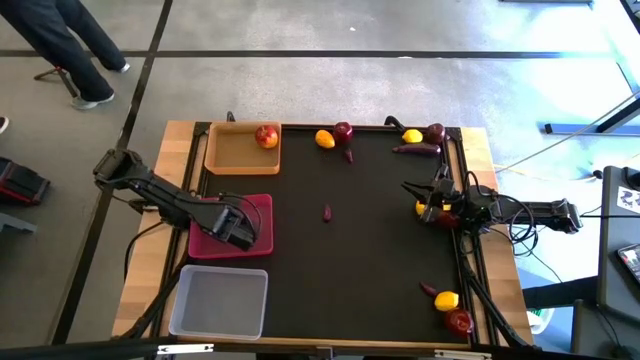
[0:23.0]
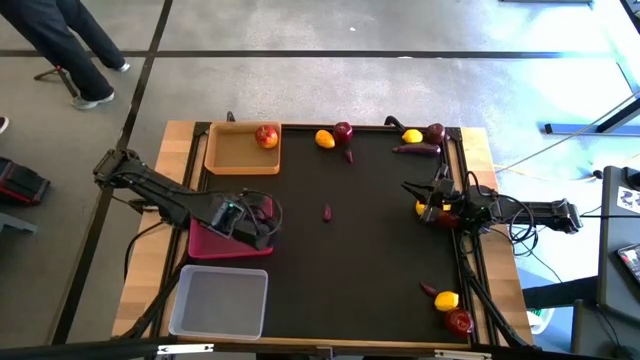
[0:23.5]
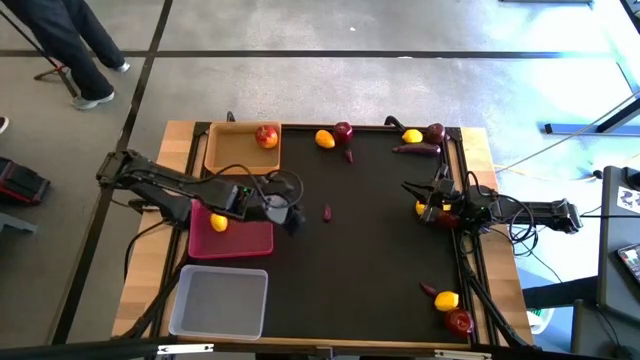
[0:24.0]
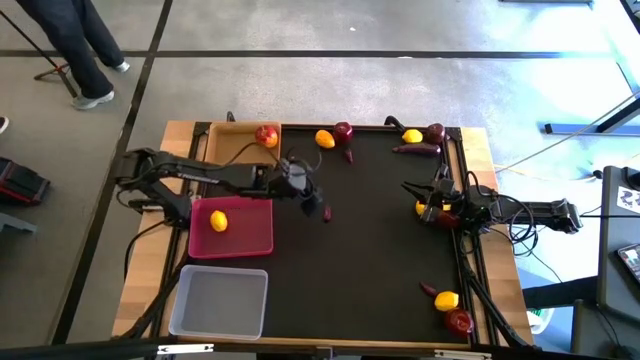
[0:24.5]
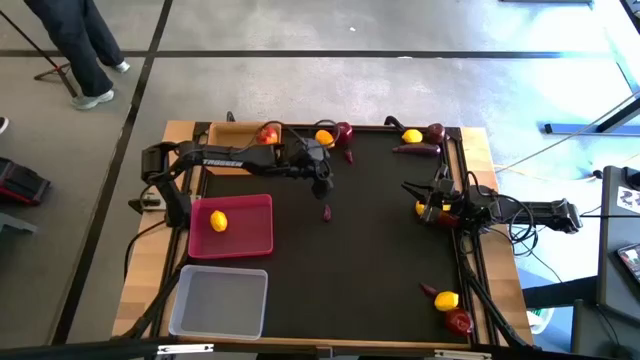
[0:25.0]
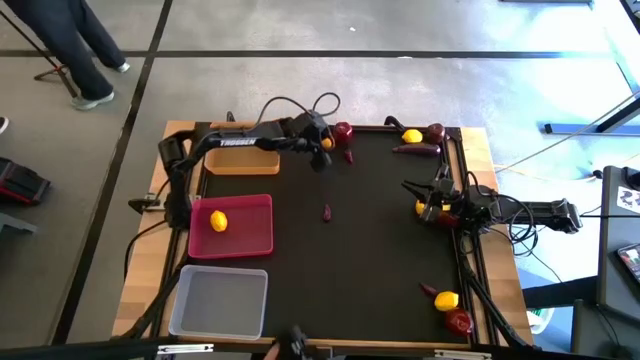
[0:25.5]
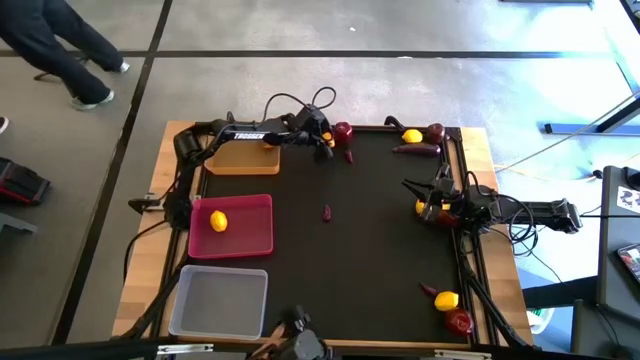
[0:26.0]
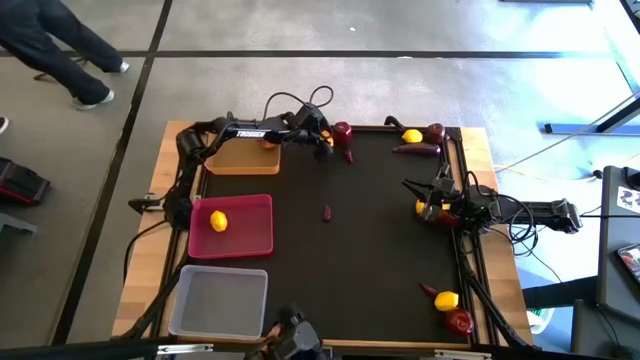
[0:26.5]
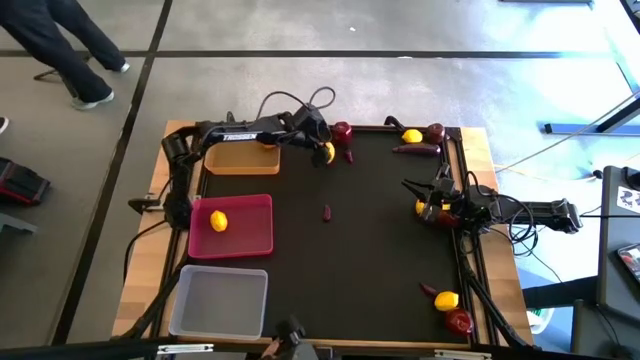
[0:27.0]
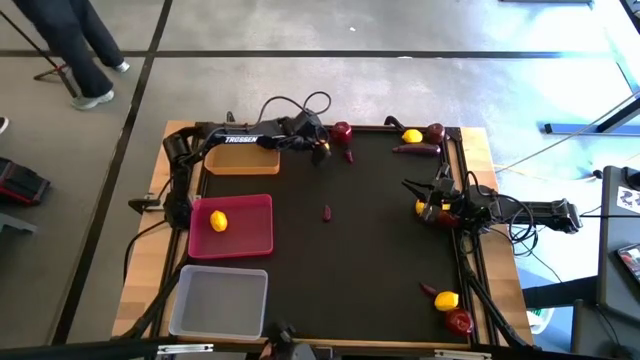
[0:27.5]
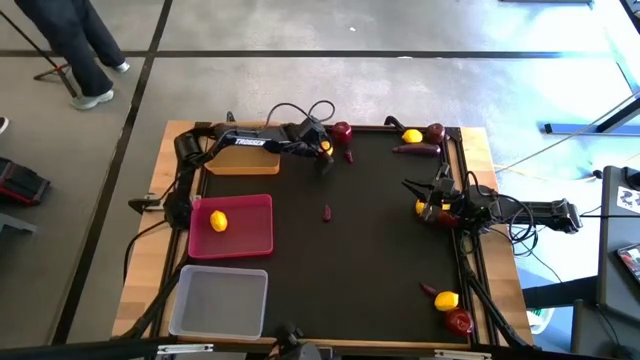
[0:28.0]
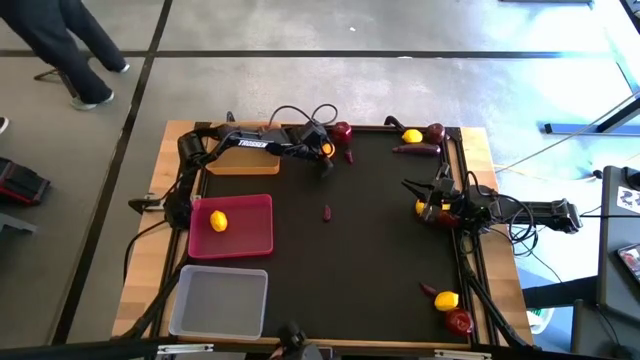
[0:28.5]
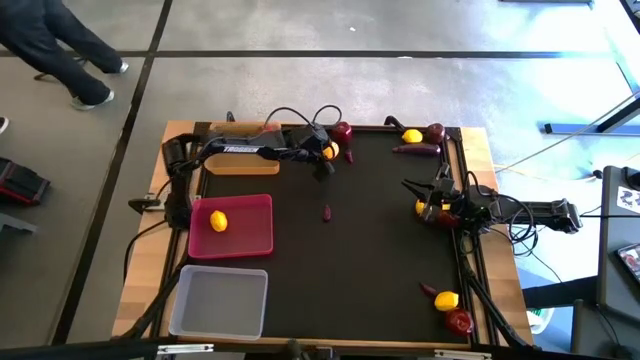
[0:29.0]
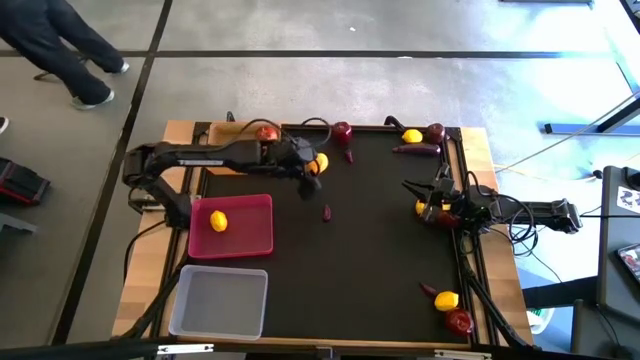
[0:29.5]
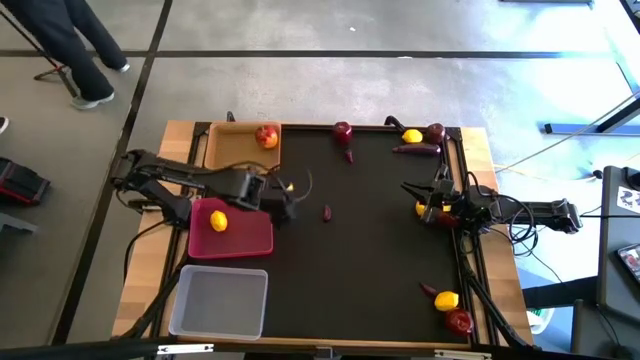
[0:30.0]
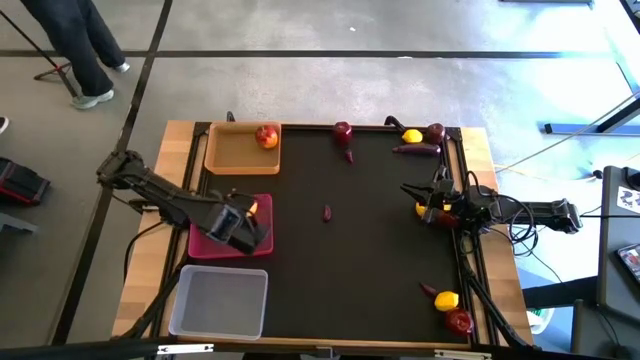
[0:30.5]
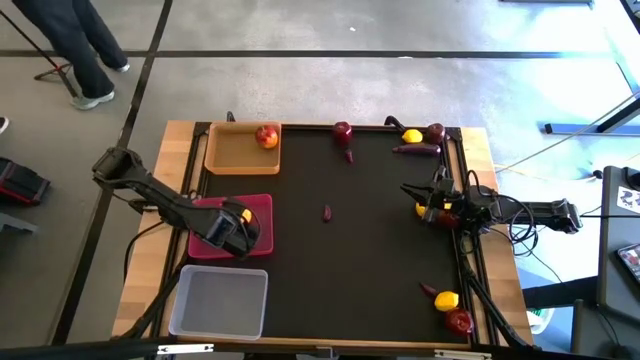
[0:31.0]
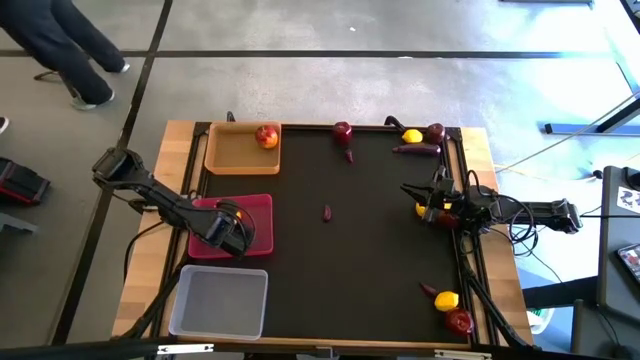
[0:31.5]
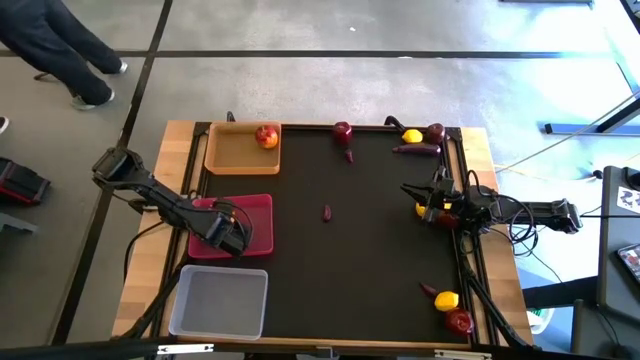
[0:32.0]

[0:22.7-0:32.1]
Task: Sort produce into baskets
Put the top left lemon into the pink bin

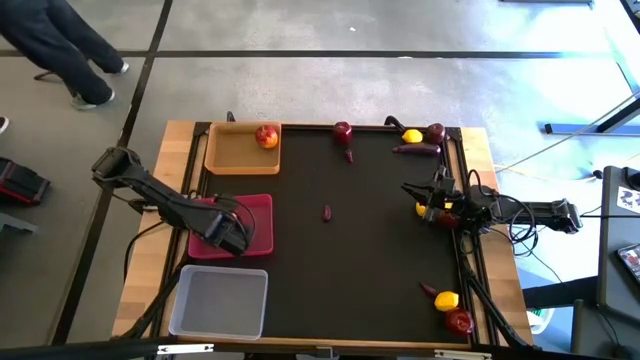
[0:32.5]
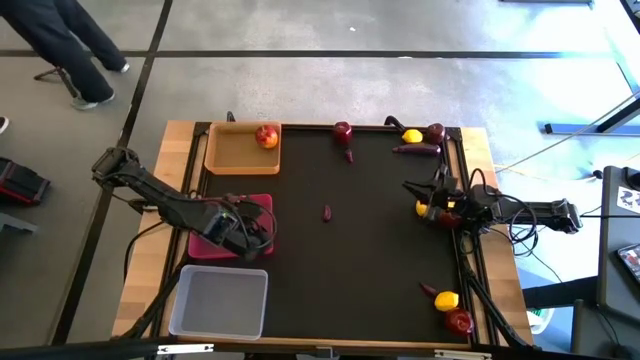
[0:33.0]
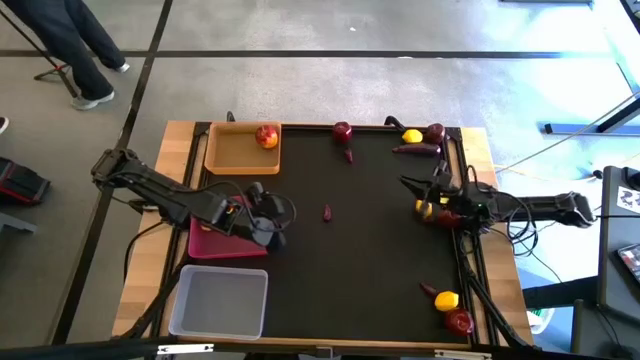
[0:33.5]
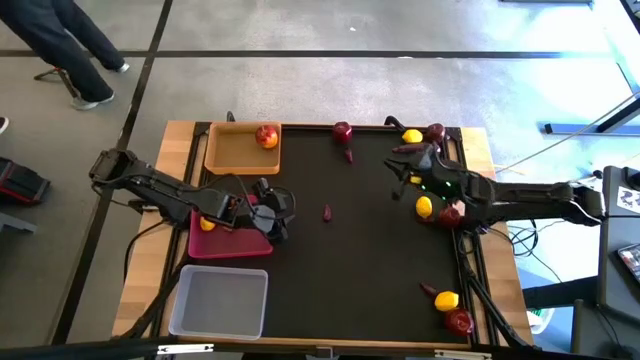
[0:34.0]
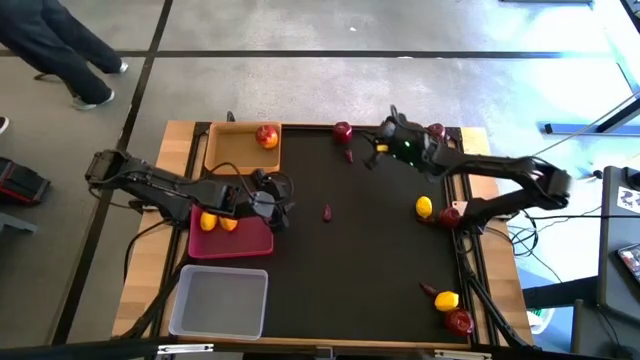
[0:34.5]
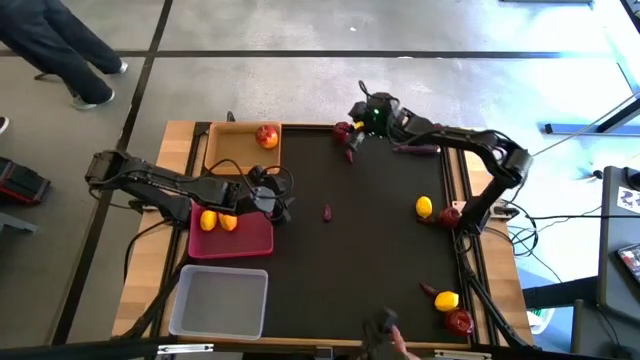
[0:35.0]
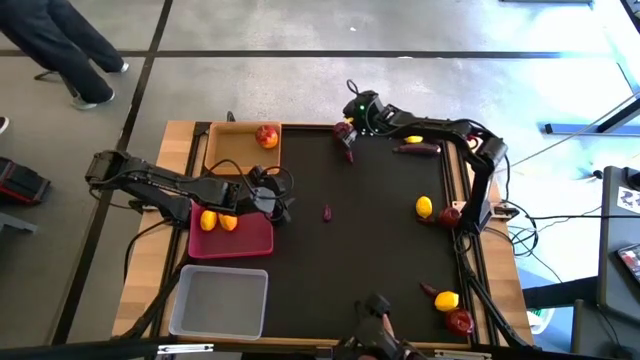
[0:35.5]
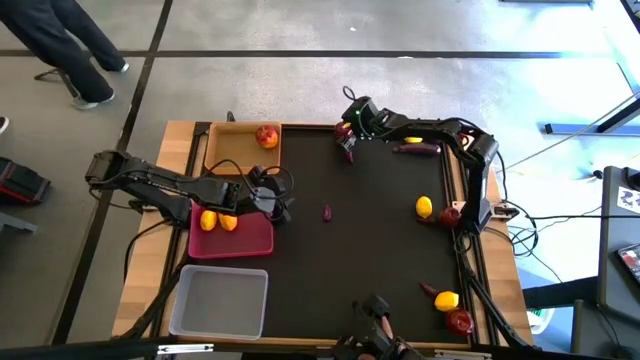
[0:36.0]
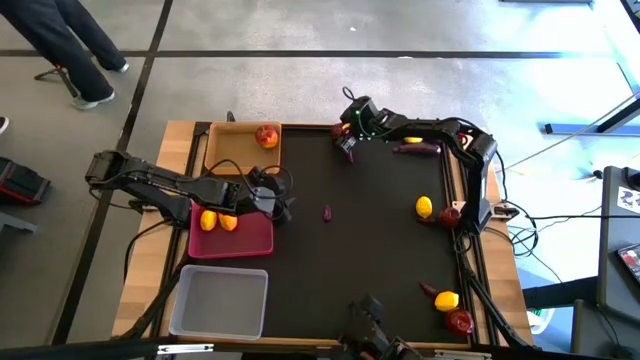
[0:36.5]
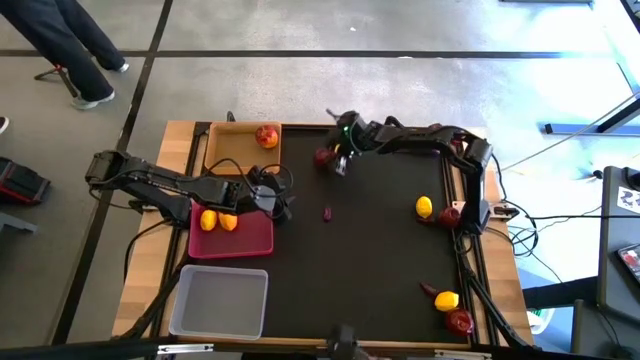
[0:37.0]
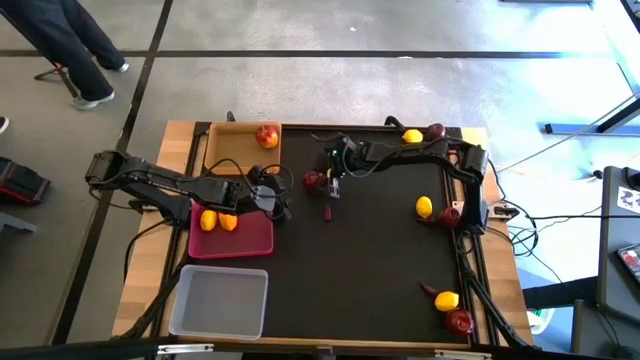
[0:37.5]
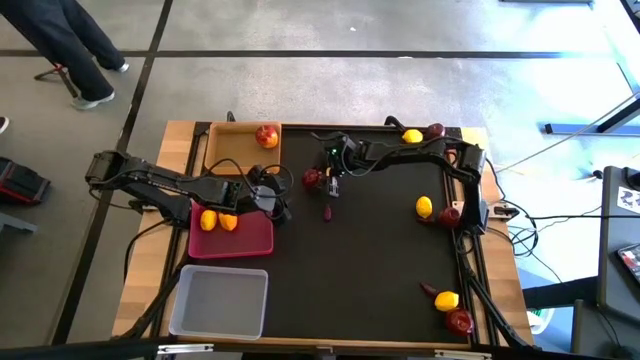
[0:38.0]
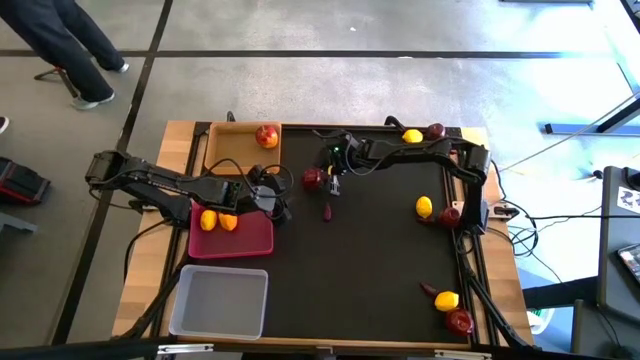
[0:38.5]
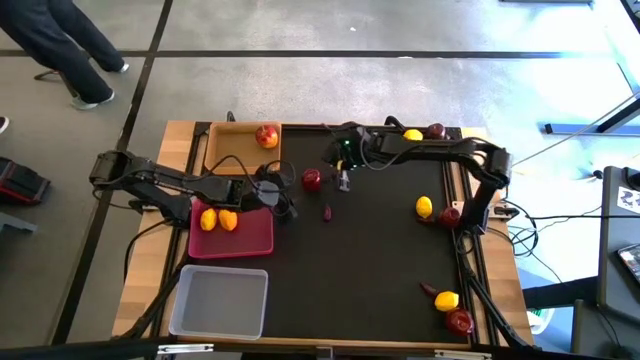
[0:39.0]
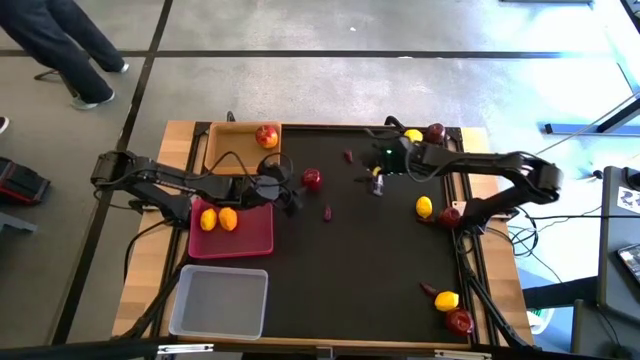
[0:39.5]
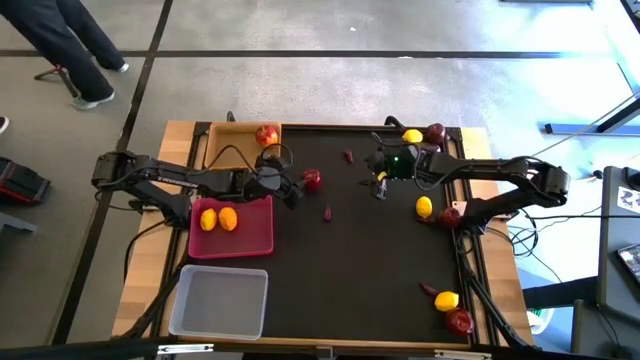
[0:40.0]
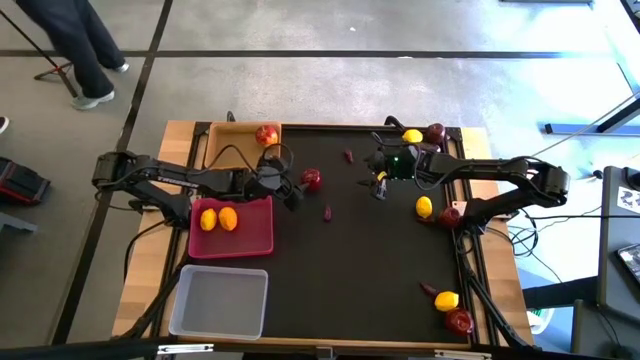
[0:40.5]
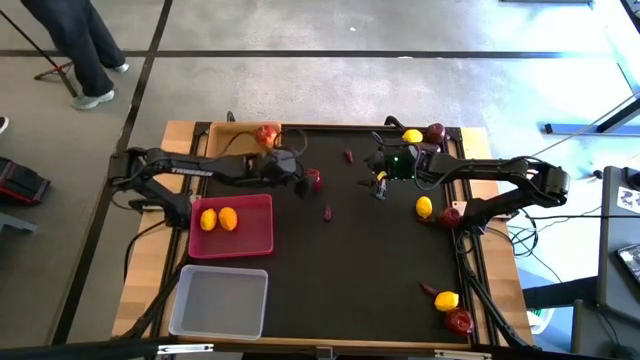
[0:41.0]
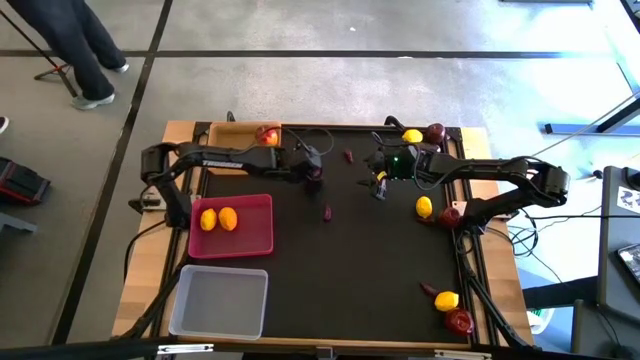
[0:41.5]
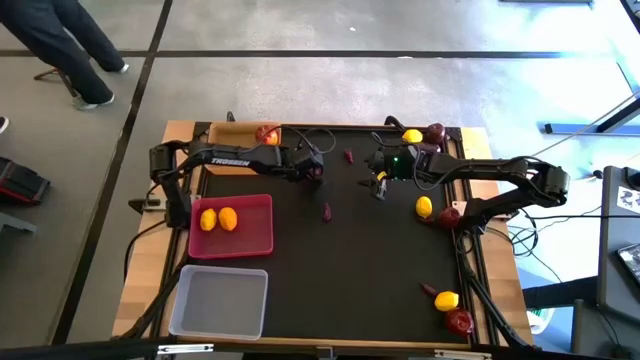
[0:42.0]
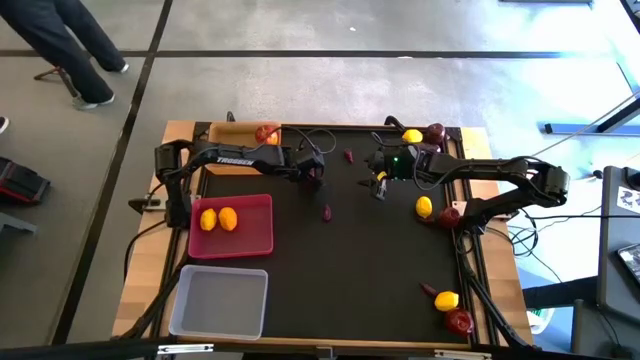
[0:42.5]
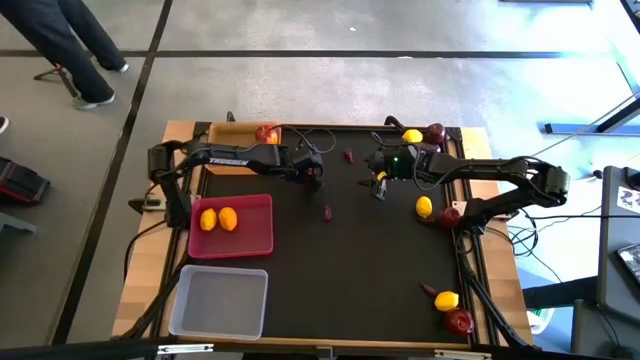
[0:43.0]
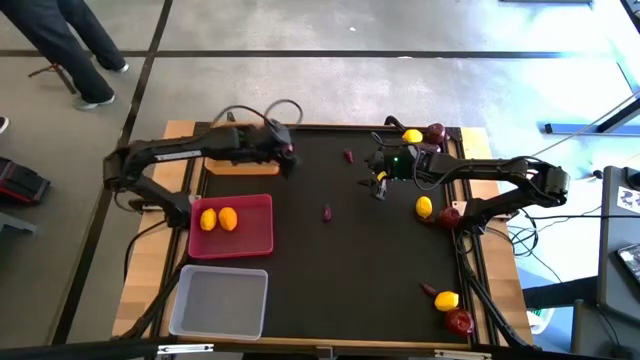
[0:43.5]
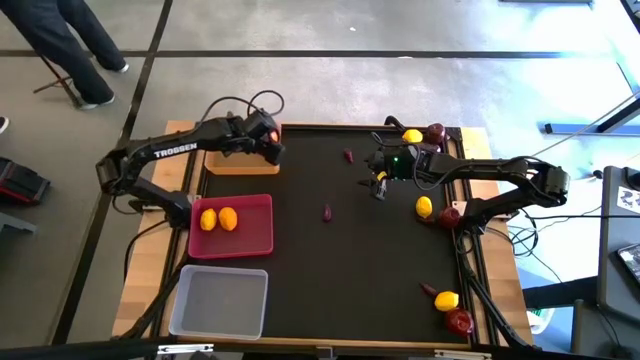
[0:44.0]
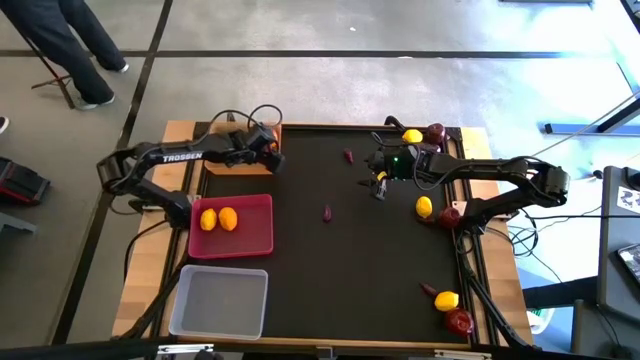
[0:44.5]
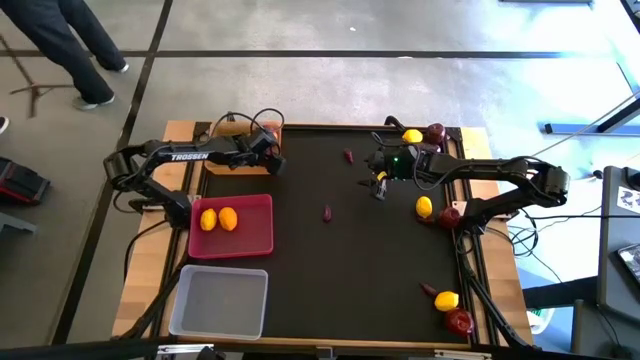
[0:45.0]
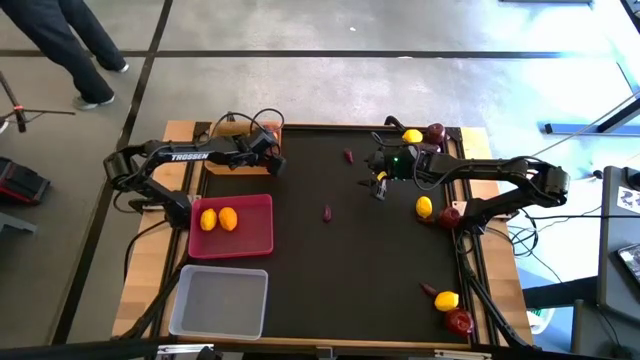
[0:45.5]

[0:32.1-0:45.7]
Put the top left apple into the orange bin
